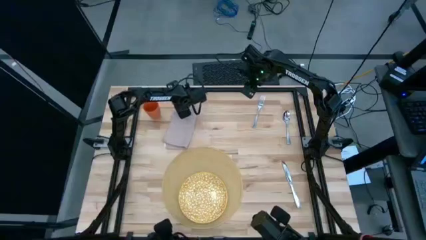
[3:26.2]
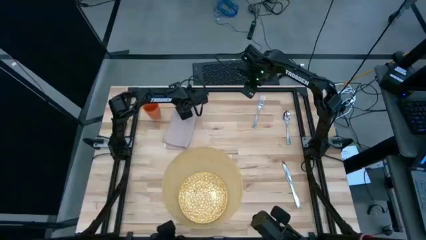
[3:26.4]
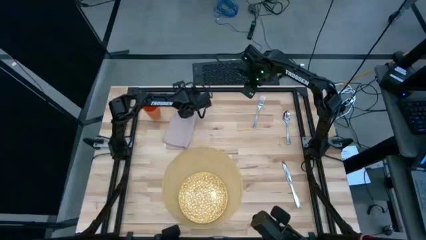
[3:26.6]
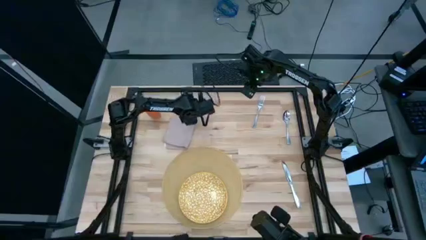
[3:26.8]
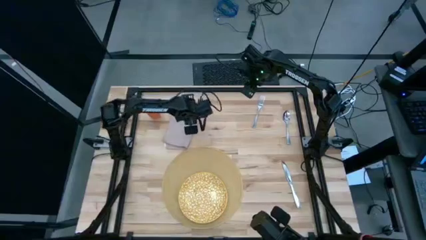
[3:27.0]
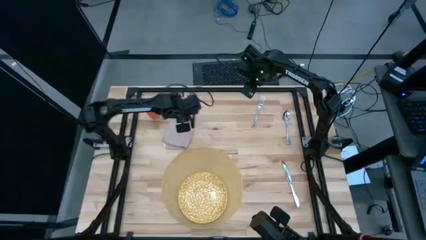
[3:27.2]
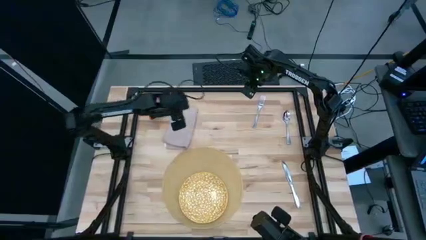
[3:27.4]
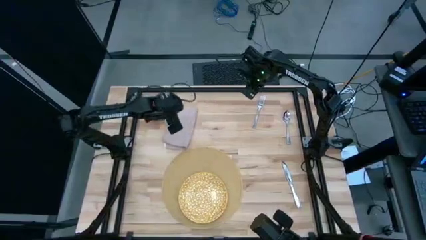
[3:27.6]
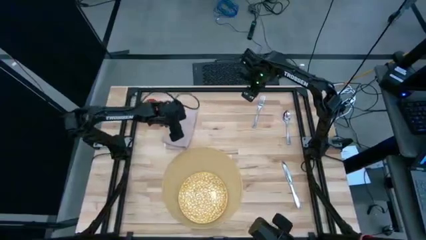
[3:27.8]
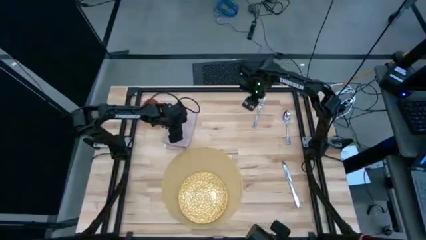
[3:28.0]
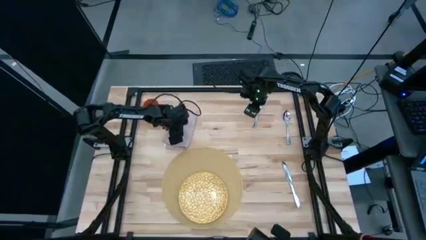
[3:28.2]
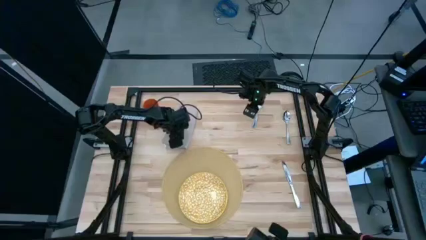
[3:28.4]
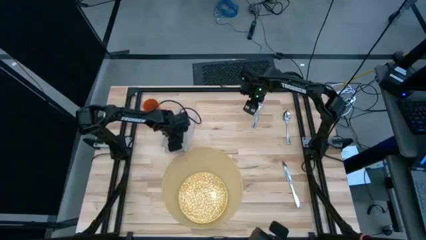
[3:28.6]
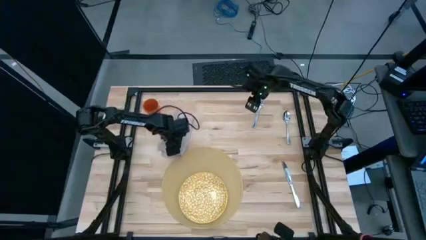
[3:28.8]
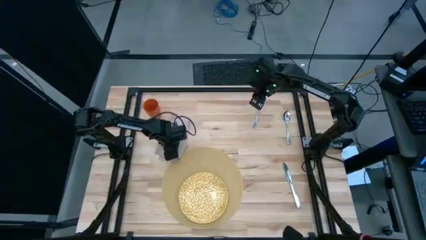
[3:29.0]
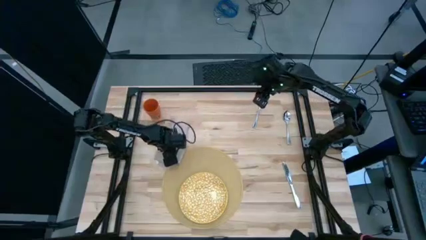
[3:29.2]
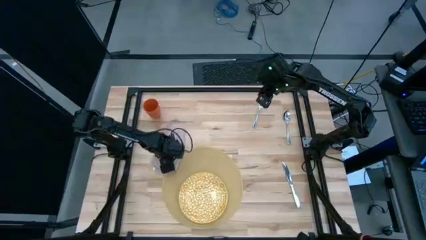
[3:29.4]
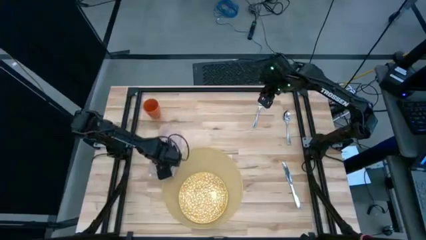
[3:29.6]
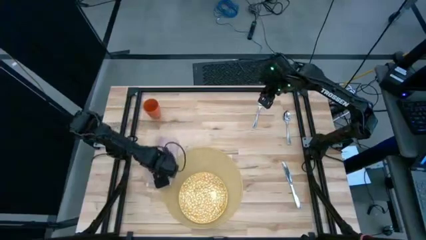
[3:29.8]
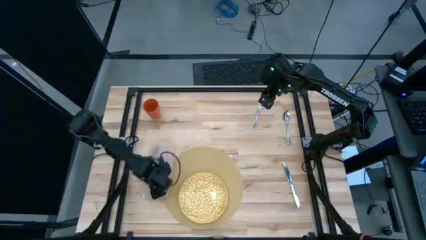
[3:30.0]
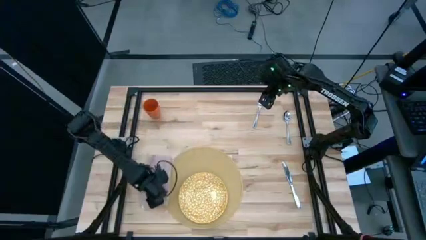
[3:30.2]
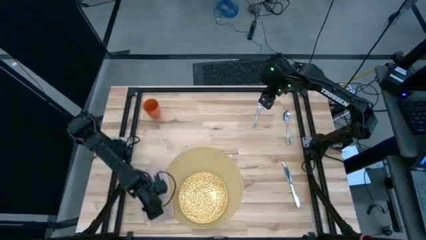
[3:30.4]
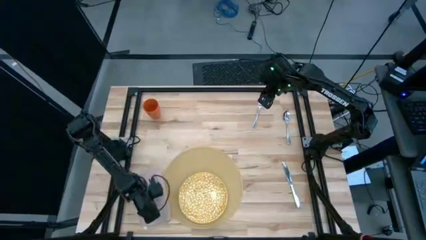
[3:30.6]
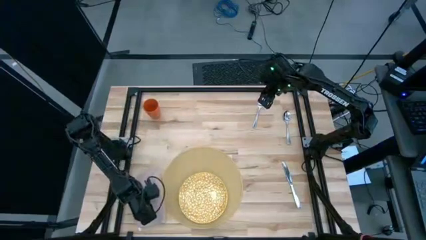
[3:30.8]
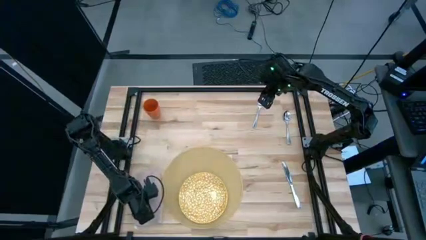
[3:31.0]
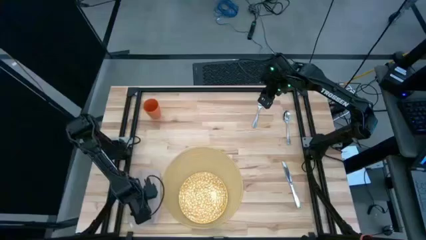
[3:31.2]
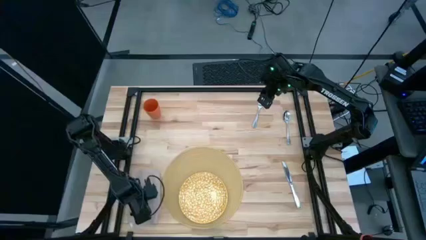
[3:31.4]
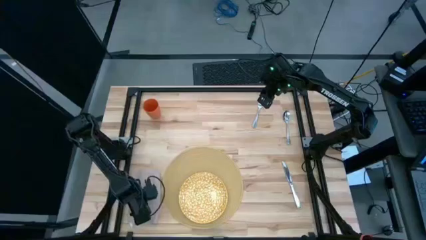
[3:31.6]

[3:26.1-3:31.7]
Task: Set table place
Move the folded light orange napkin to the left of the light brown mat

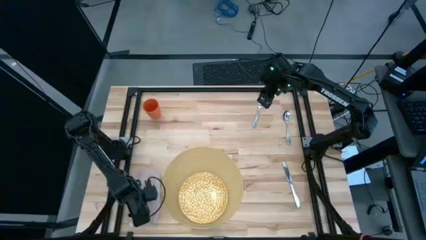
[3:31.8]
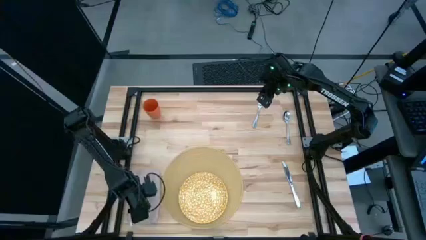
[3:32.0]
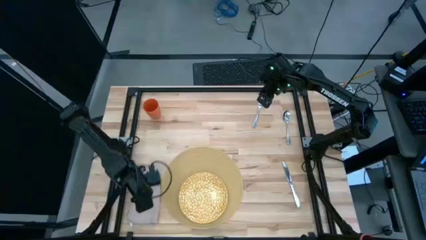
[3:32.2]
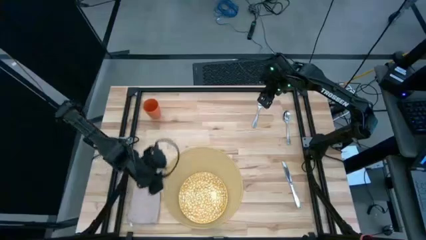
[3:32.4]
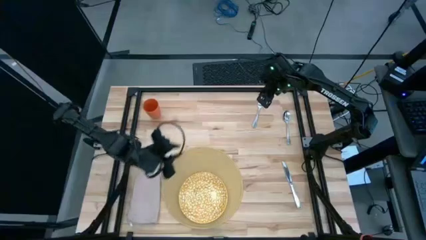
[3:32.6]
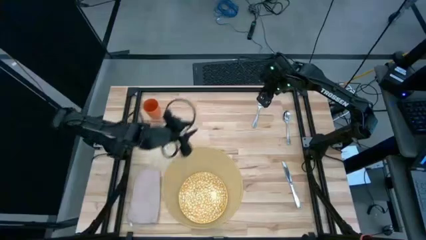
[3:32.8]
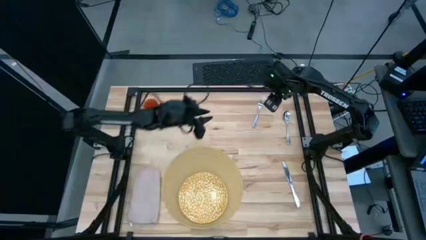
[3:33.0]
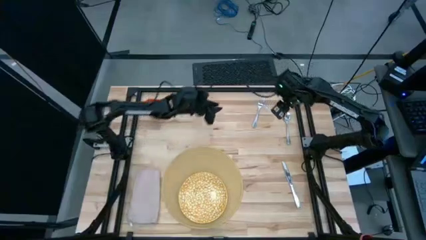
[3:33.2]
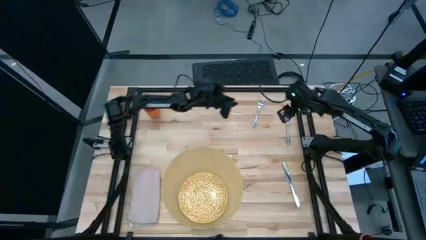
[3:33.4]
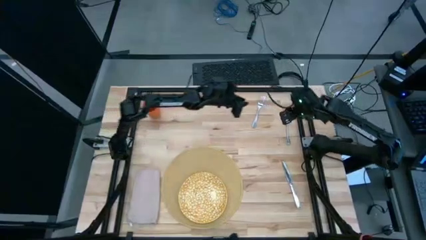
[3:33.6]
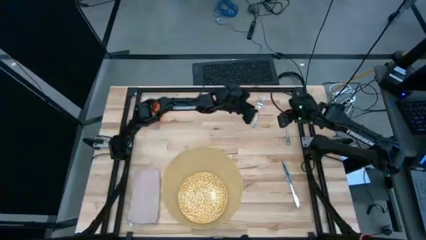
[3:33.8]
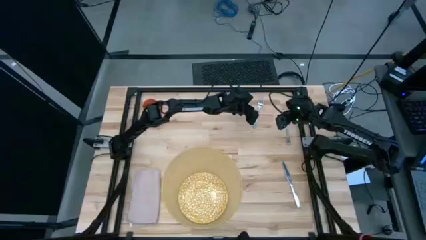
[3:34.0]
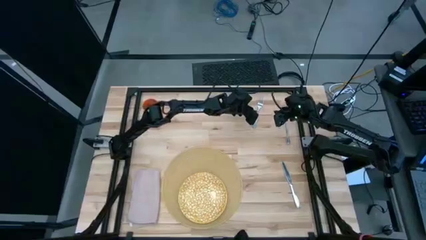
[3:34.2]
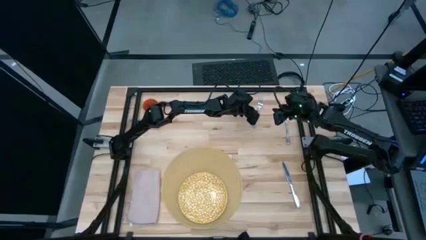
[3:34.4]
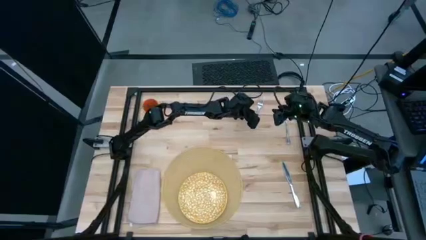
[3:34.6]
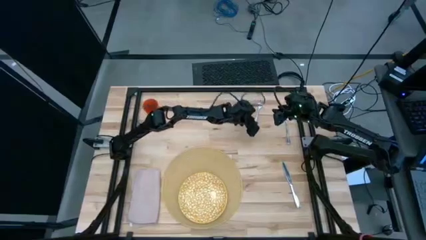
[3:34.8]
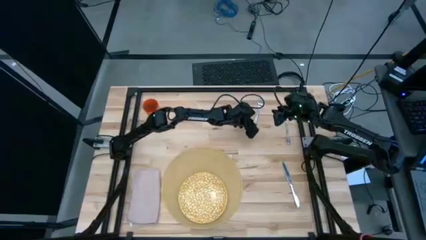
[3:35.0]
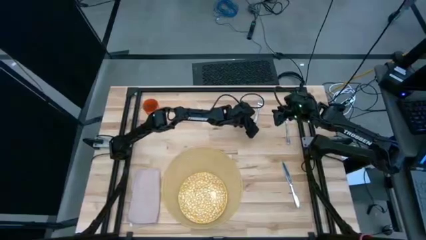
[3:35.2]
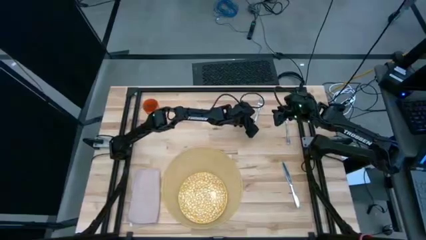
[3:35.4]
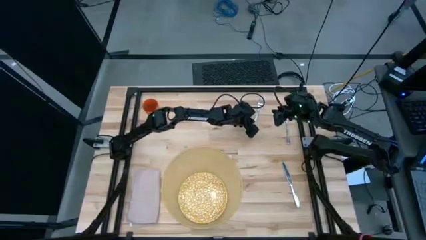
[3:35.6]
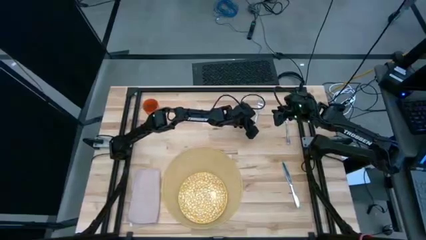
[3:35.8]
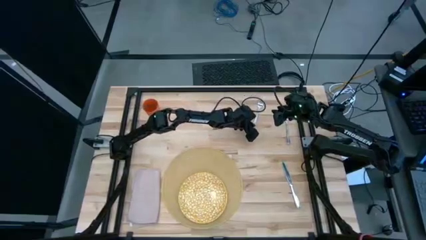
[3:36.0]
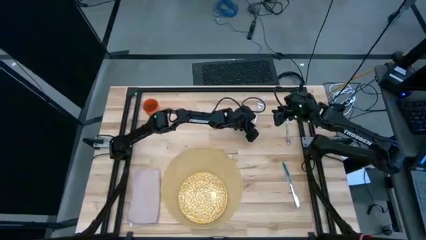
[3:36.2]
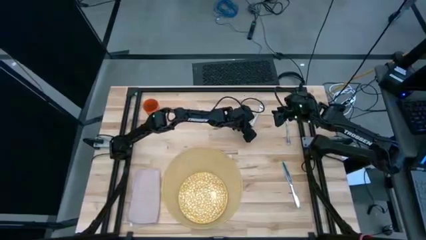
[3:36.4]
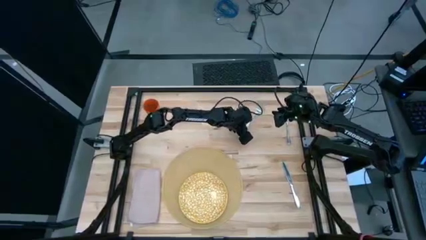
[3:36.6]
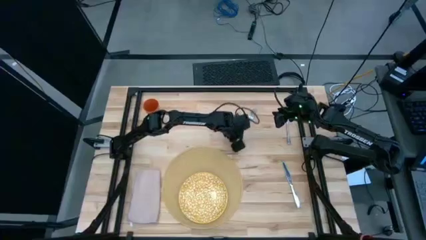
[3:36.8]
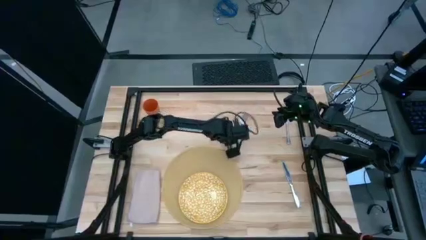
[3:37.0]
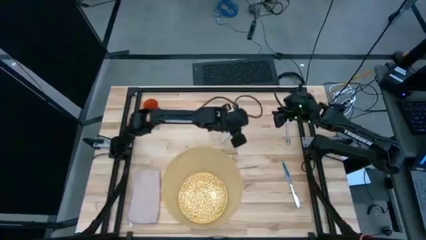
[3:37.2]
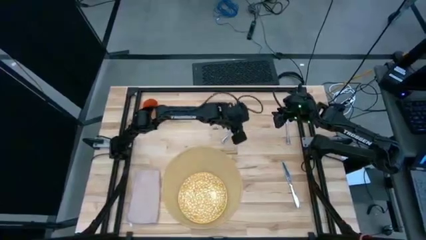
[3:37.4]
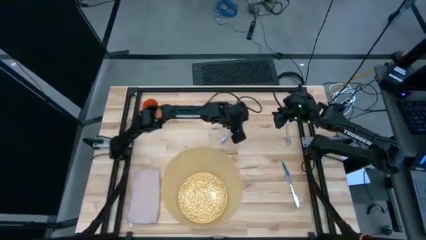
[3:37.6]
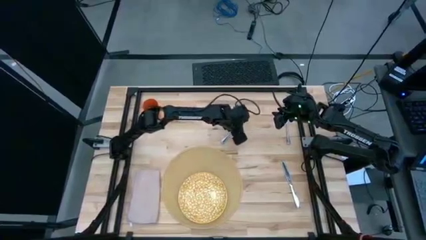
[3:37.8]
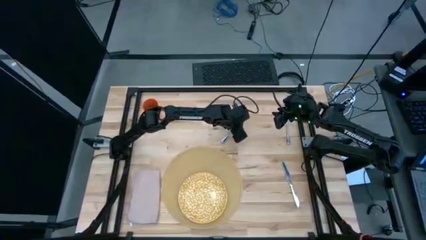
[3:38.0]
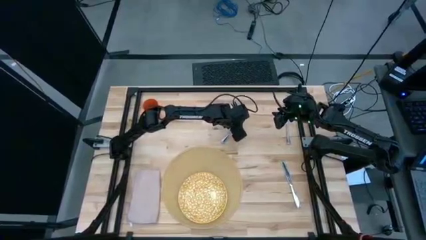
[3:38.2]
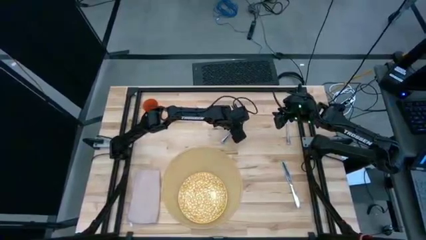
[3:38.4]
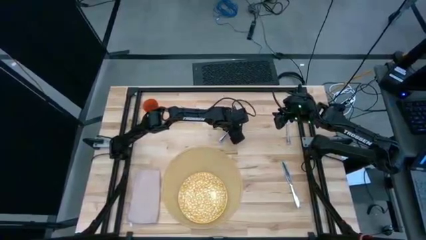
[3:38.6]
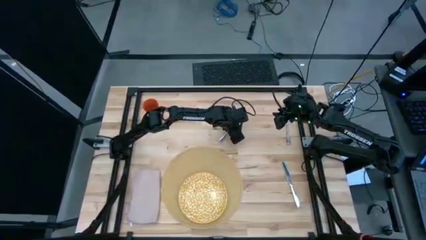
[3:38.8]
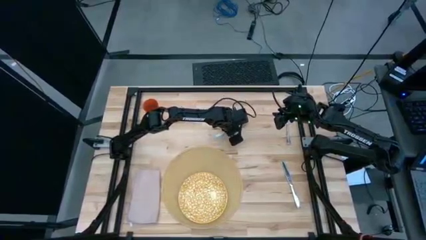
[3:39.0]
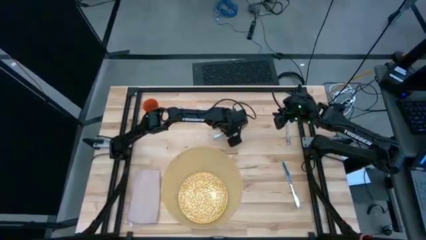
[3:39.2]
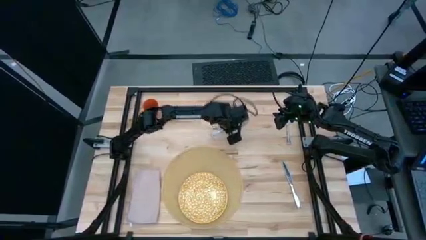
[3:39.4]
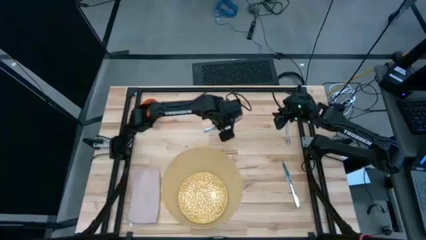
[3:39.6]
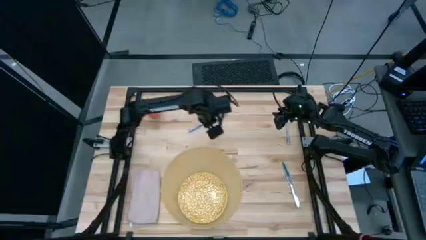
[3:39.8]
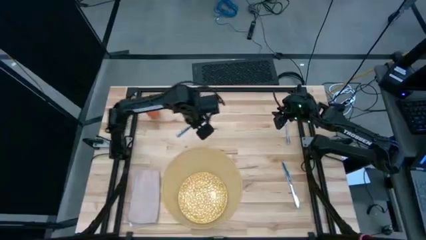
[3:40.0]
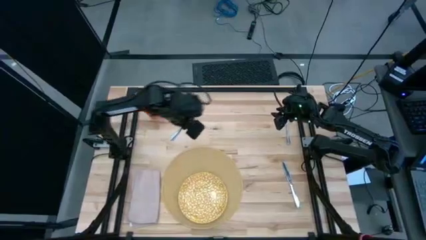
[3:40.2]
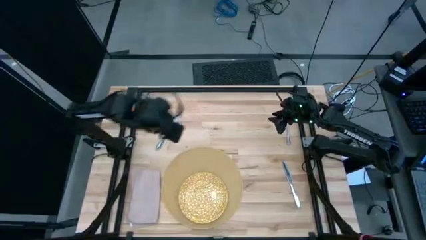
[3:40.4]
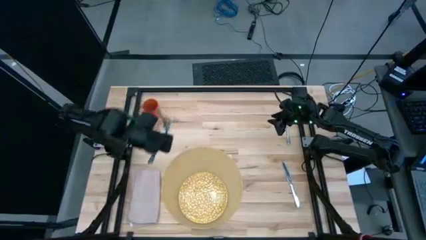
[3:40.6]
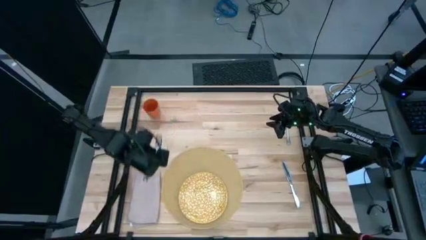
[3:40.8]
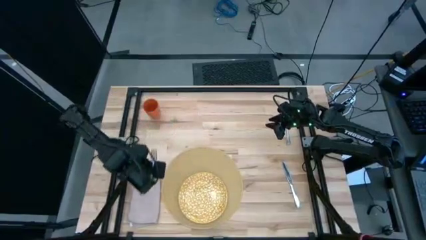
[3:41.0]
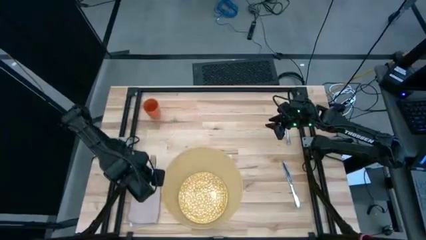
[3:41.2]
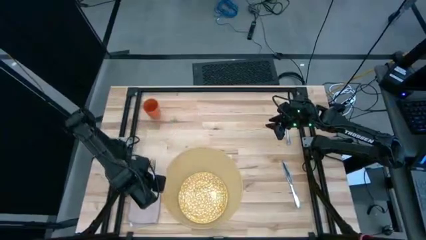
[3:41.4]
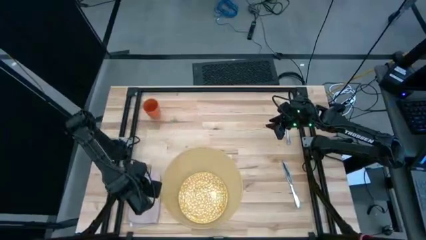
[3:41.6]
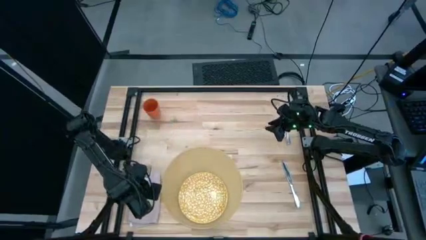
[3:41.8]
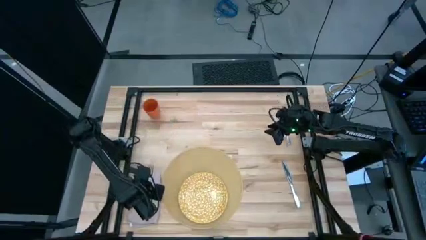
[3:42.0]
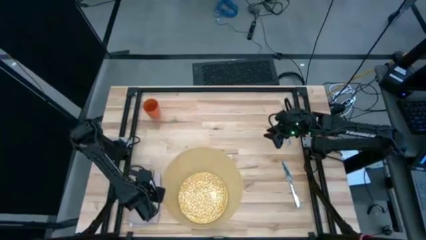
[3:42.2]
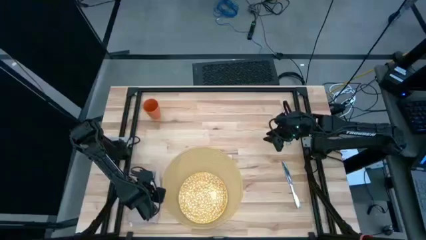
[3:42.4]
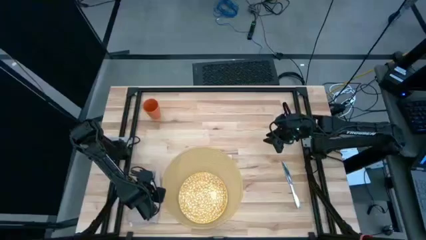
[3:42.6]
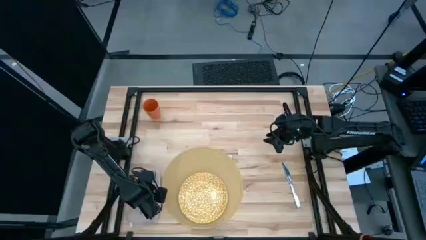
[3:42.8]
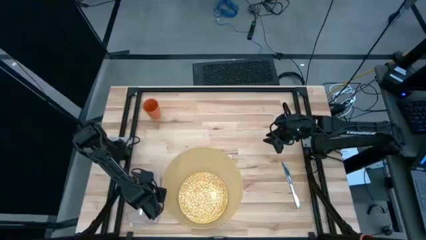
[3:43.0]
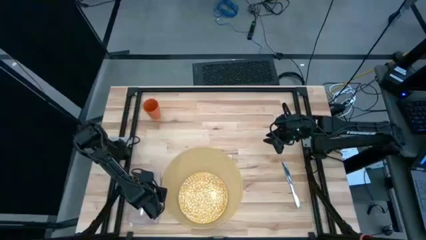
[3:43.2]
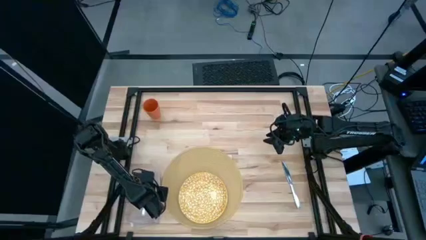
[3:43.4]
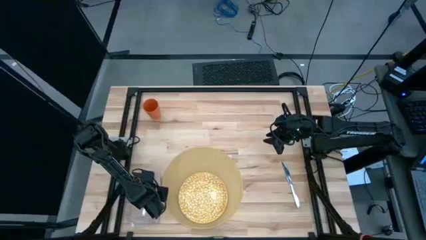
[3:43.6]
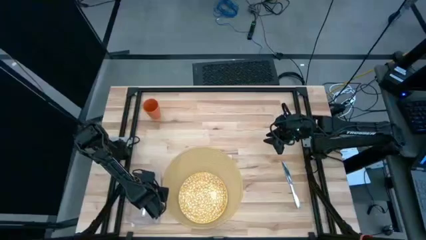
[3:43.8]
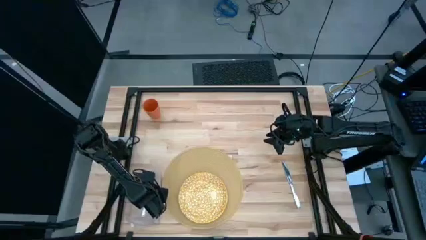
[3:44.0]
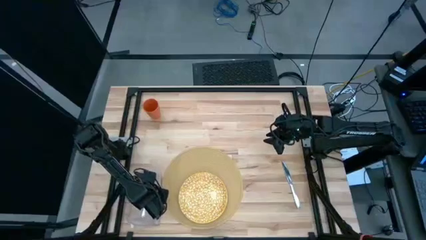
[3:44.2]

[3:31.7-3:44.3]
Put the silver fork on the folded light orange napkin
